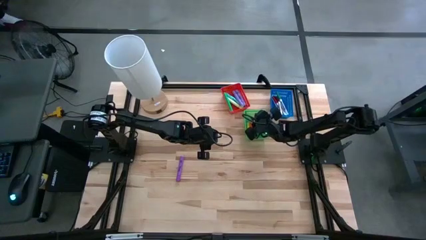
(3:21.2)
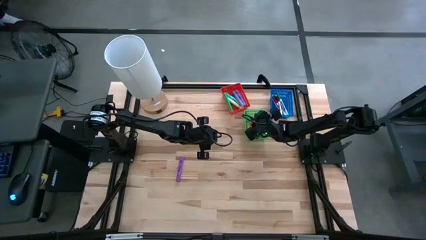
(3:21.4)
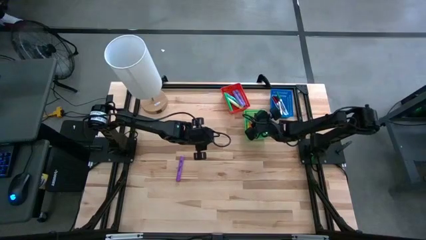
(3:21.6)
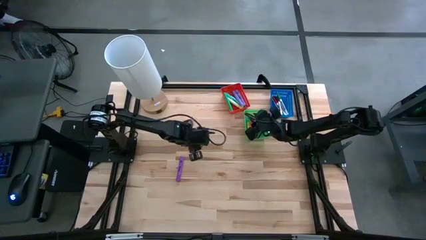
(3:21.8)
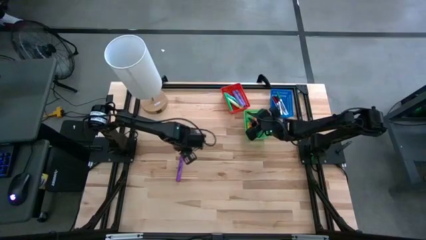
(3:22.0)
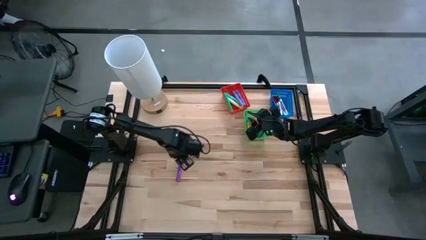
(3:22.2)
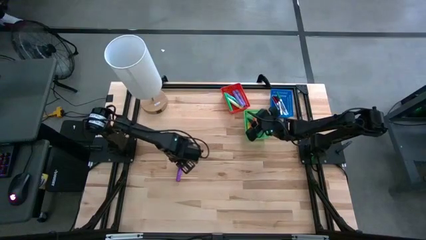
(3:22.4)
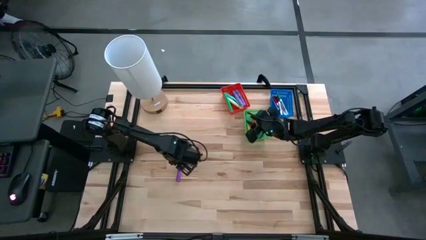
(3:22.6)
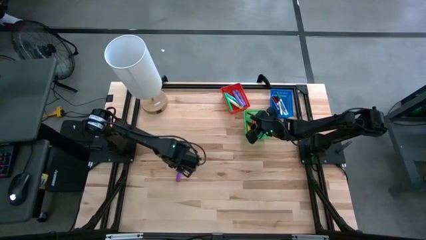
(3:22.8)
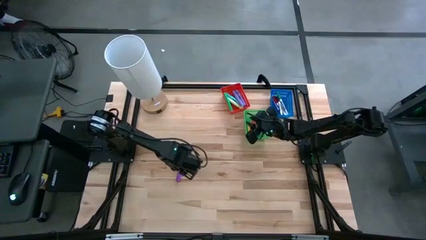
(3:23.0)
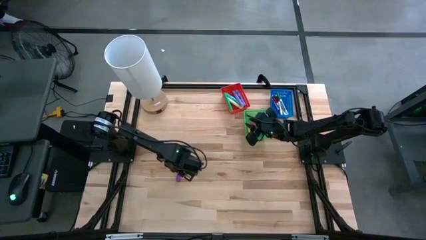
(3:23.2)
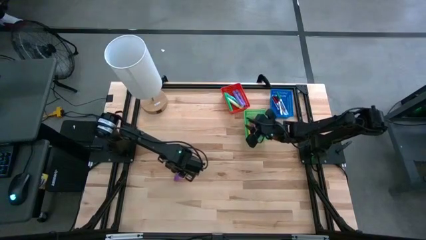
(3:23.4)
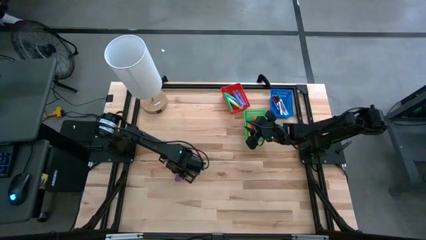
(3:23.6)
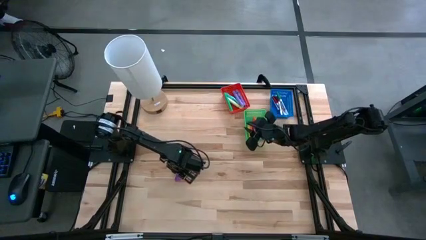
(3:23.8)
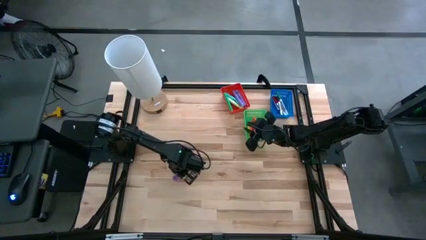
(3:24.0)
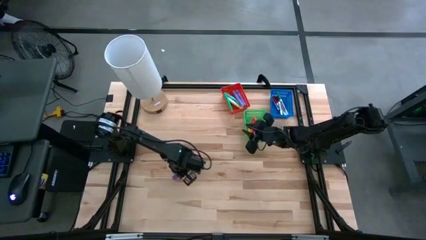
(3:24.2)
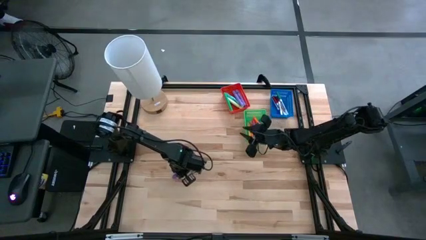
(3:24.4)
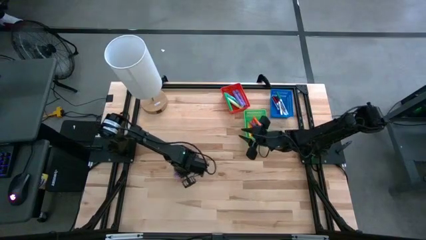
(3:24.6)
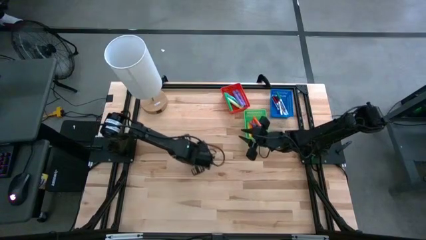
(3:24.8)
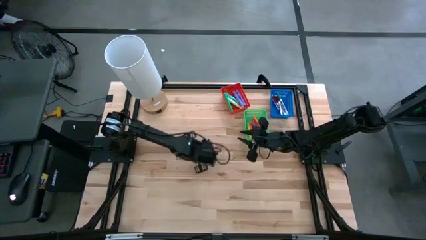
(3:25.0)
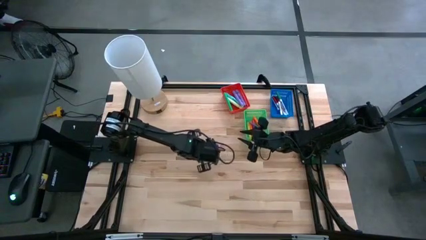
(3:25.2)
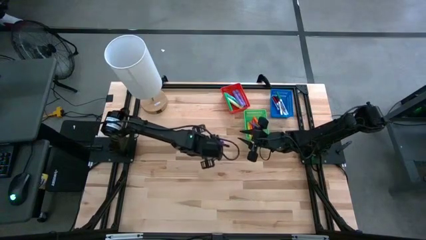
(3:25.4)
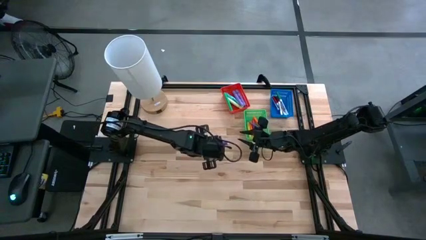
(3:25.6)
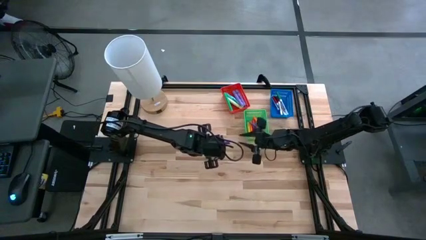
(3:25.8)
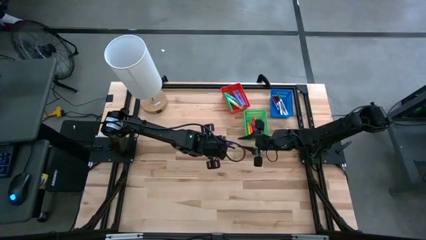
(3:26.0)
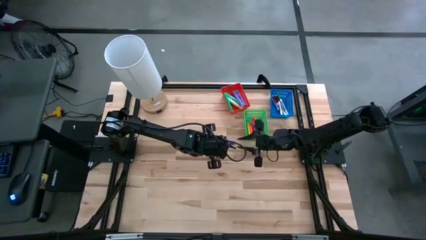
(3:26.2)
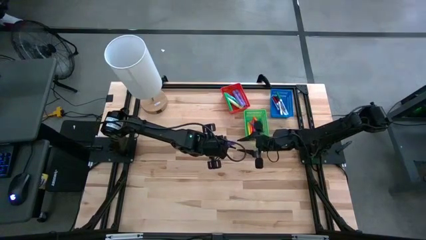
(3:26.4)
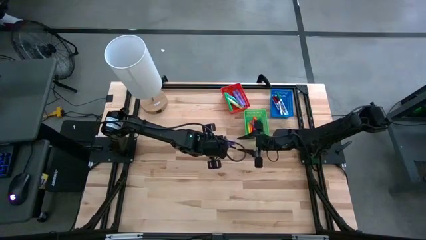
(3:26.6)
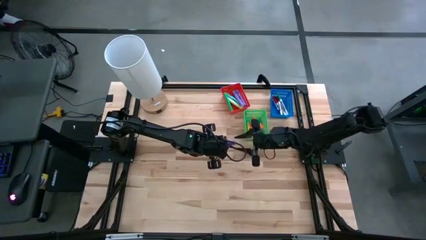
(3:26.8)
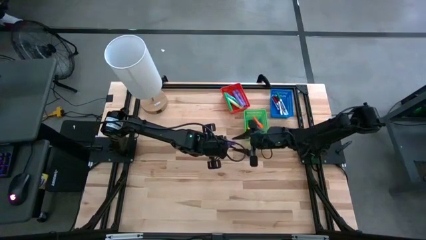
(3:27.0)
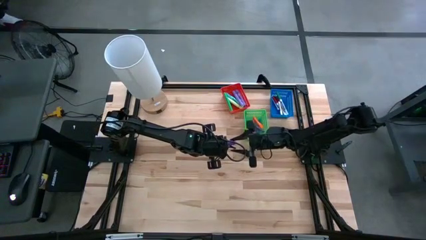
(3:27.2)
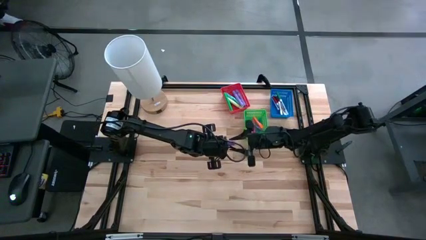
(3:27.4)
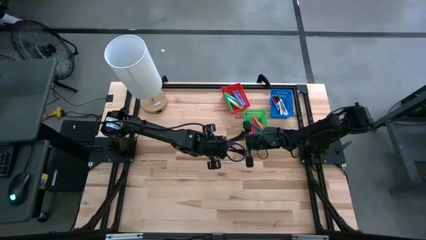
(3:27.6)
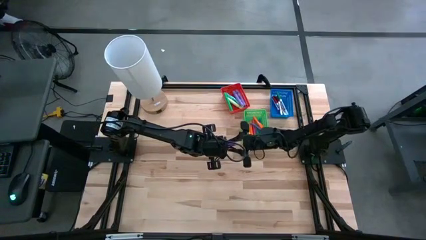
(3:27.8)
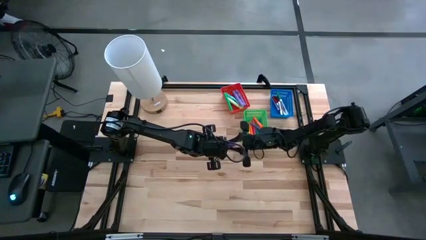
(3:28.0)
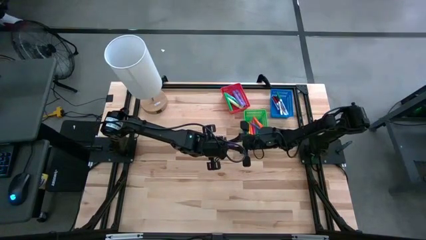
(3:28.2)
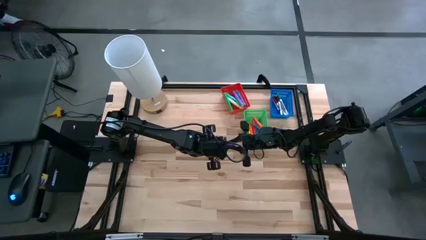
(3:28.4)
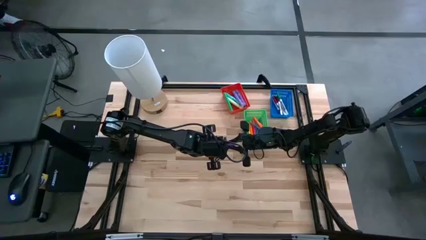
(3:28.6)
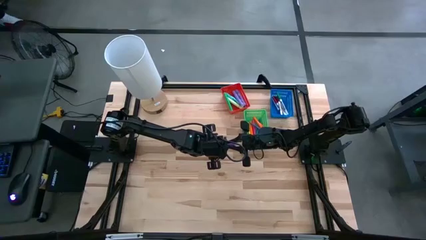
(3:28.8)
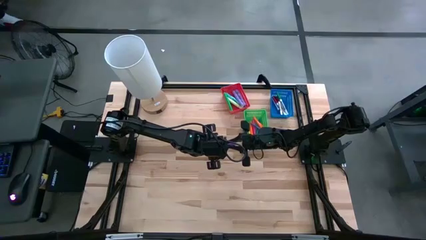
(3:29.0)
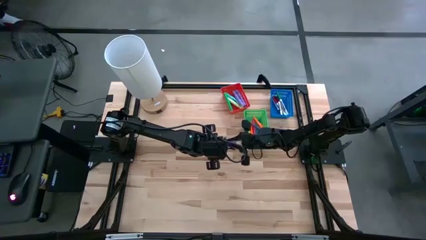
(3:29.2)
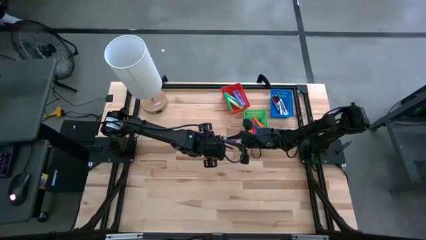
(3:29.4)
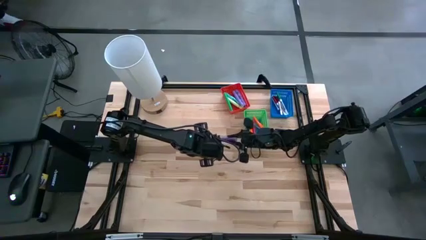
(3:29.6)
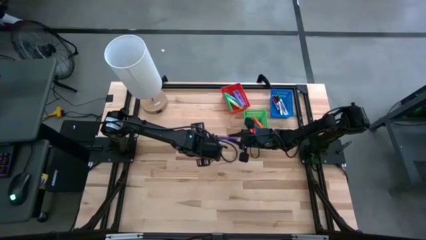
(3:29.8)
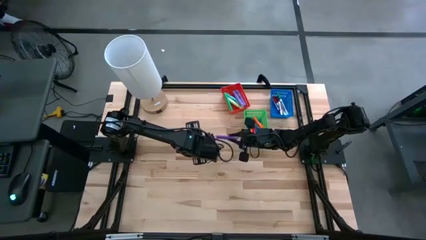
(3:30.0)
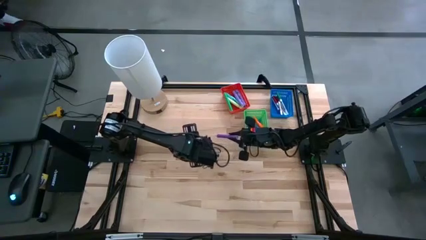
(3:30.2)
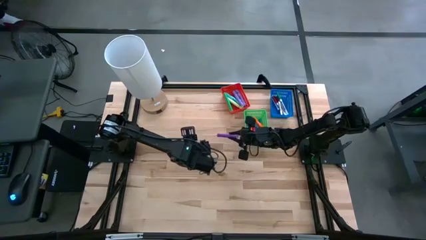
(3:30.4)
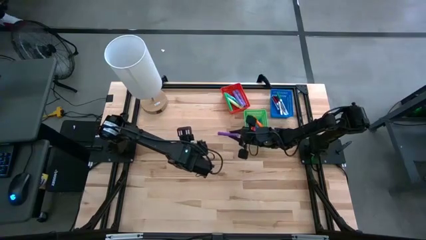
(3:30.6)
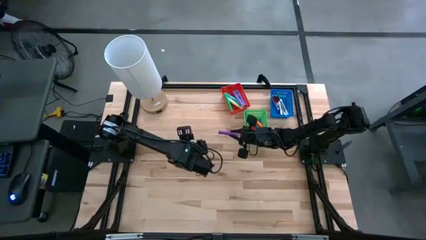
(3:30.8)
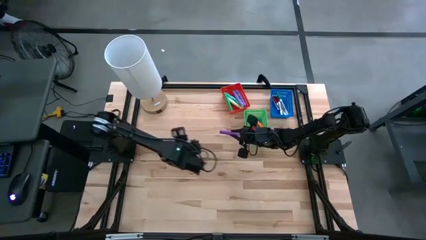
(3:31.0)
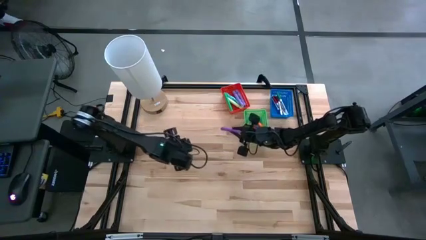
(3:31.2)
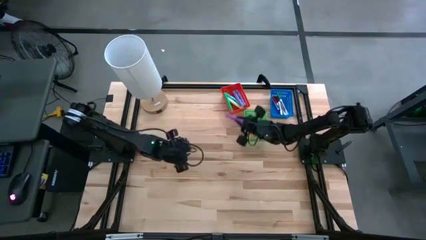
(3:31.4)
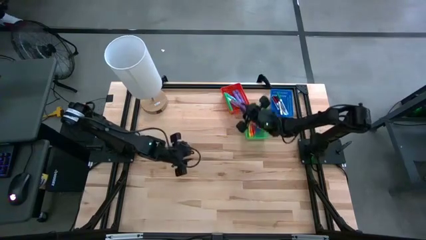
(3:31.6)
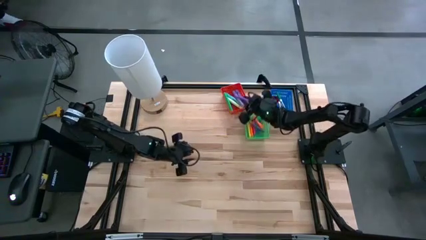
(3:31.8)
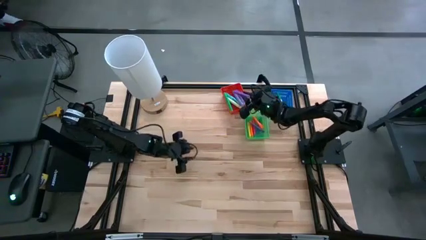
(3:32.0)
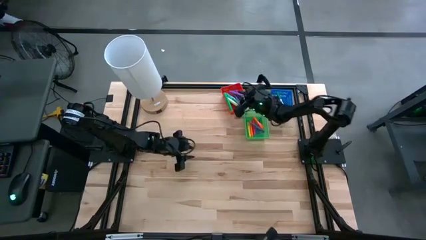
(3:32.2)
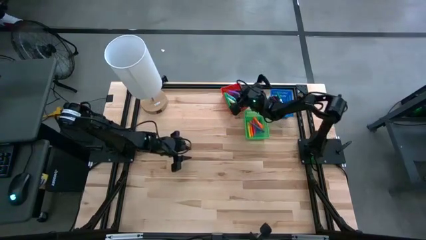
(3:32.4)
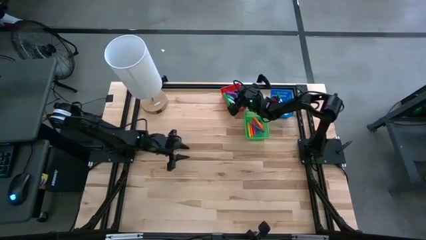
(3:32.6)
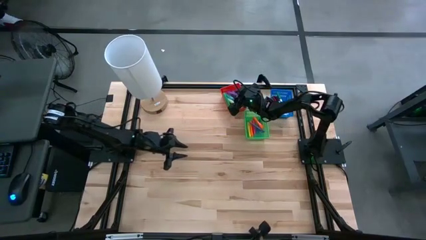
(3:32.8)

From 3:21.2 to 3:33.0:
Task: Pick & Place Markers
Put the purple highlighter in the red bin

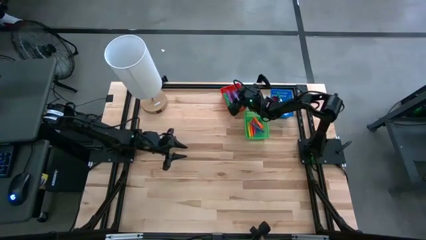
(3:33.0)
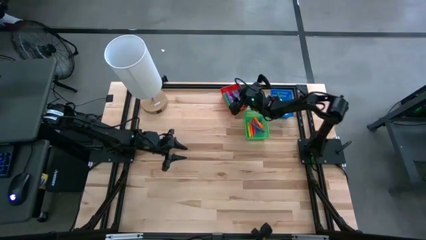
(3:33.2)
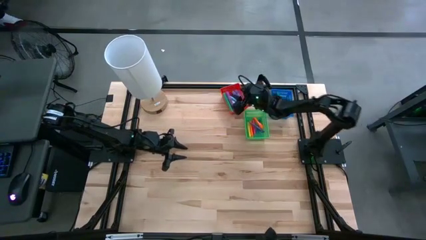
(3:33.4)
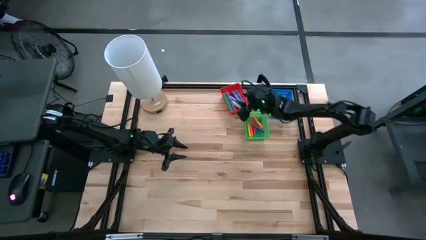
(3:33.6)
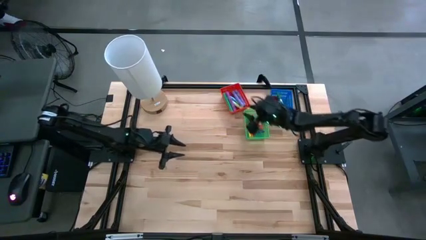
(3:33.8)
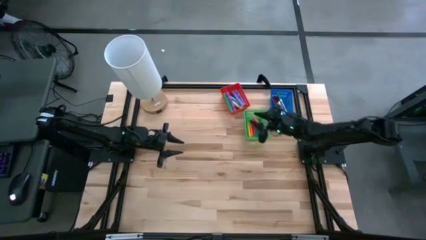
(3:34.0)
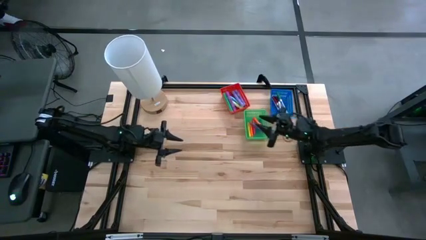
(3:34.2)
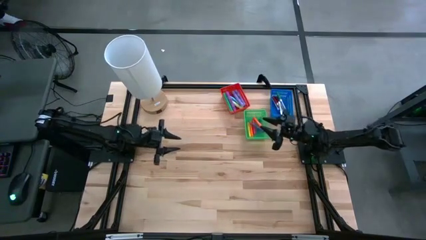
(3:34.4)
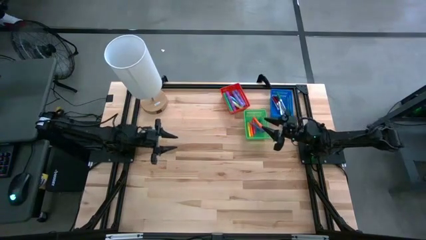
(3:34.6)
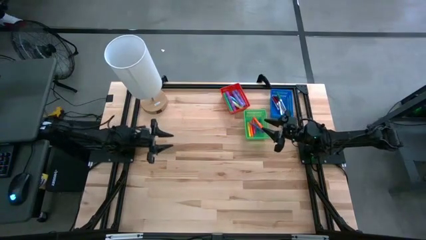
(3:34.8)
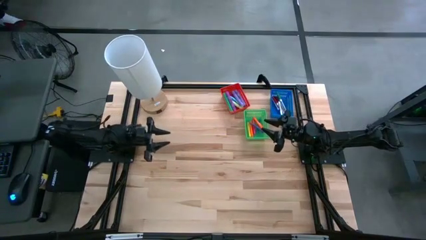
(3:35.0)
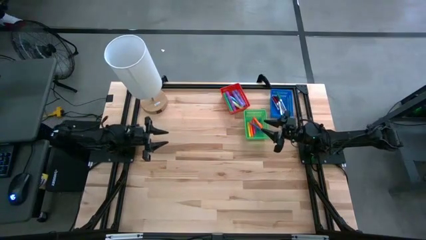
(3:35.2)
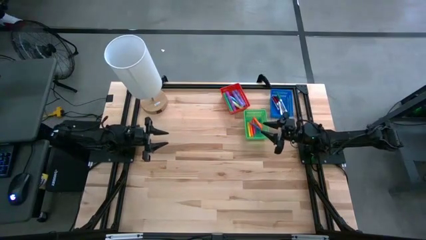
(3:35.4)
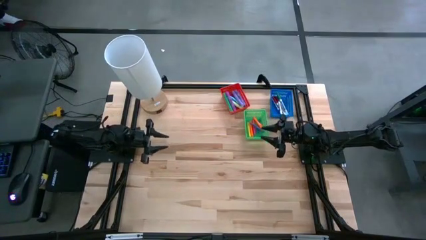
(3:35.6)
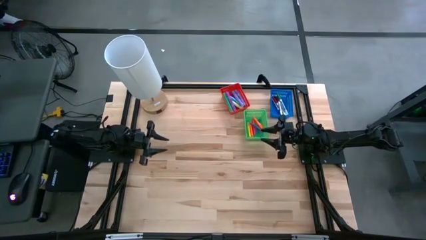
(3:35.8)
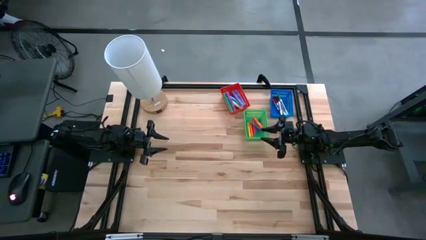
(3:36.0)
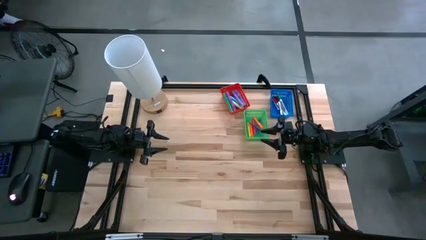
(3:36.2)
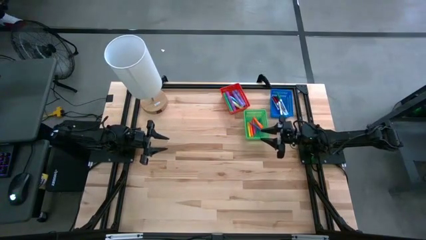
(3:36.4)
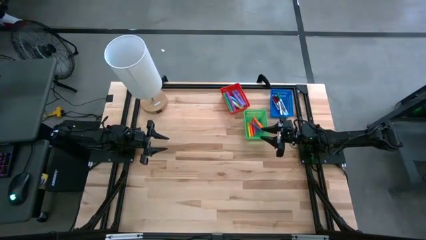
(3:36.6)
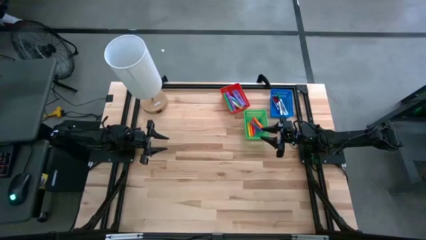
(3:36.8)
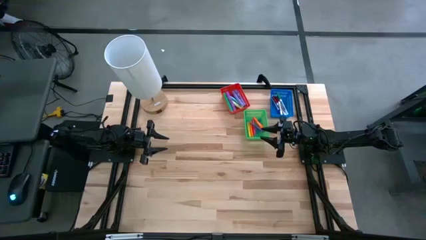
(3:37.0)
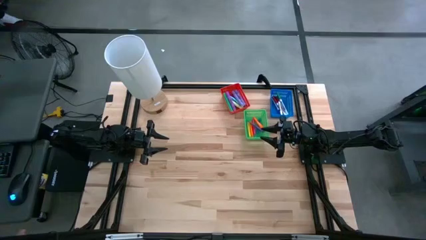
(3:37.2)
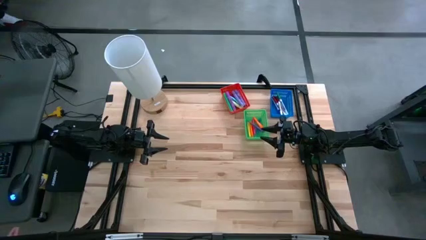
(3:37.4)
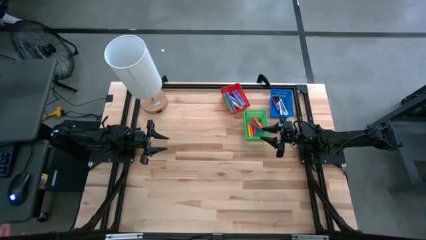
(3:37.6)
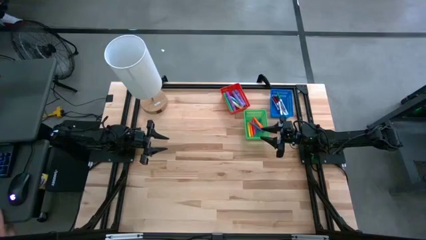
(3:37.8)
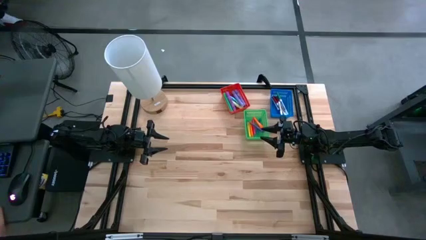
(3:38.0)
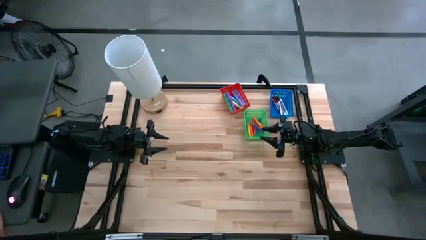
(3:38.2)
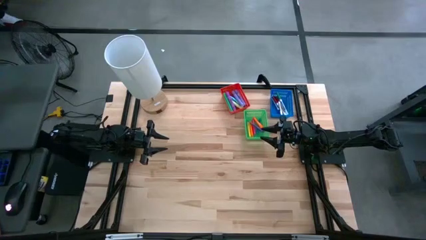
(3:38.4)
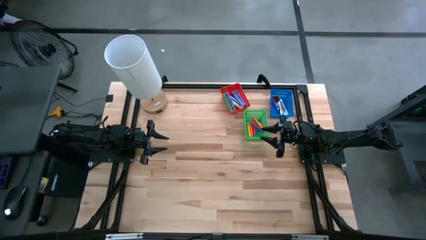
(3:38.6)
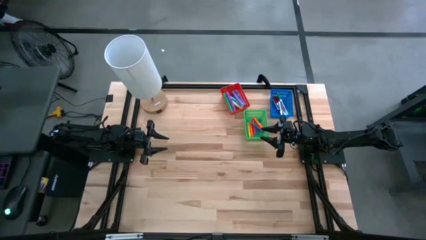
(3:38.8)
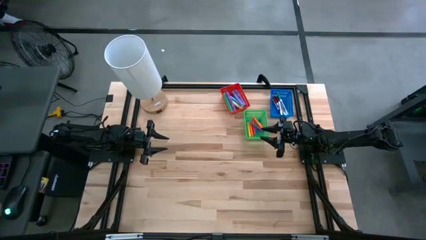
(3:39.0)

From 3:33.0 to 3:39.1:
Return to Home Position
